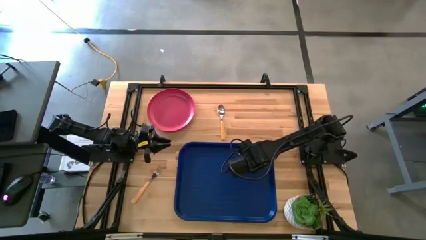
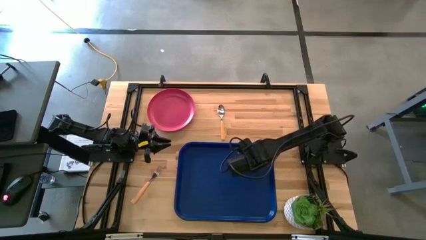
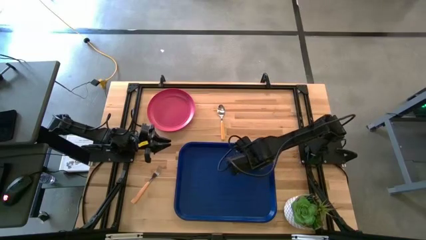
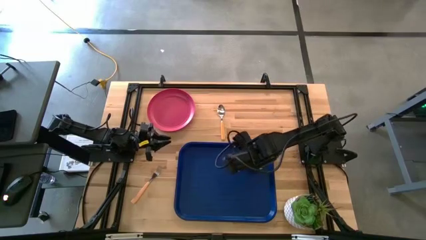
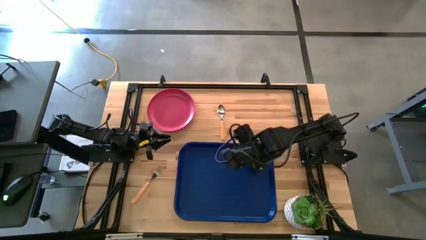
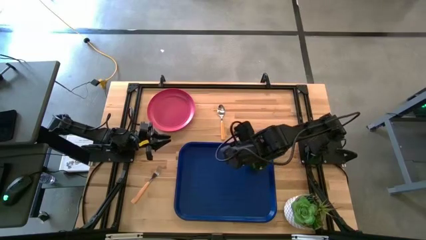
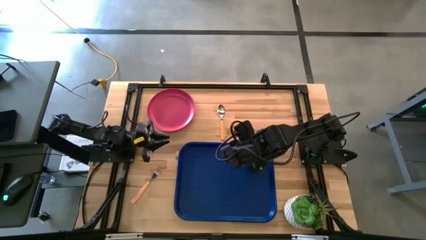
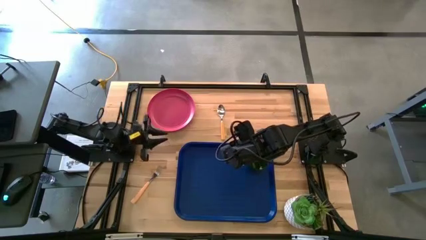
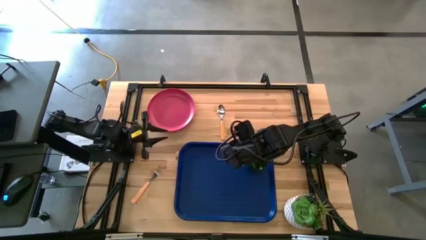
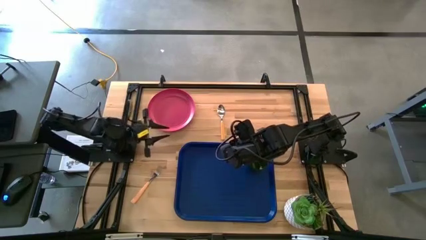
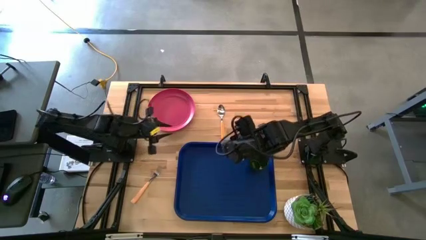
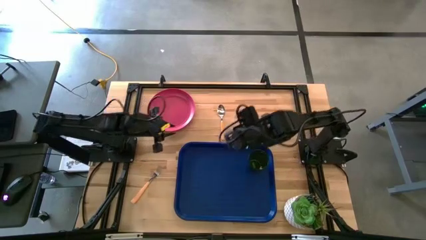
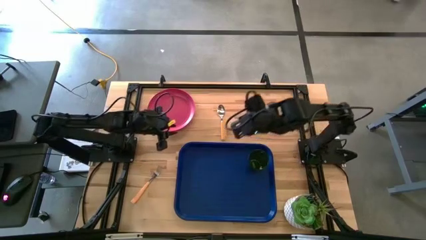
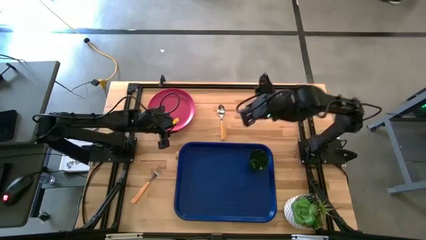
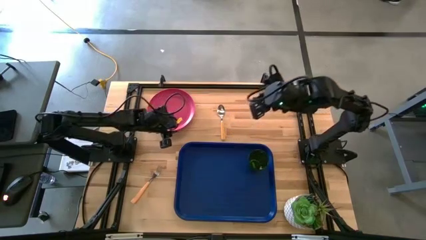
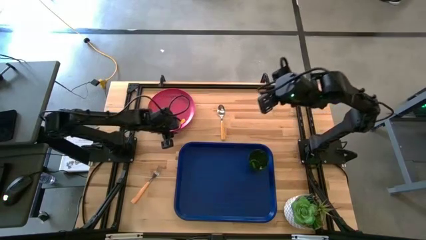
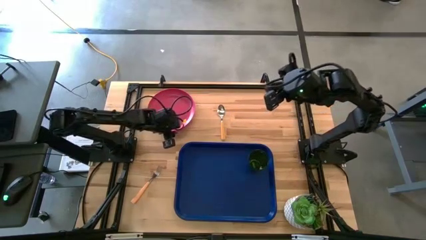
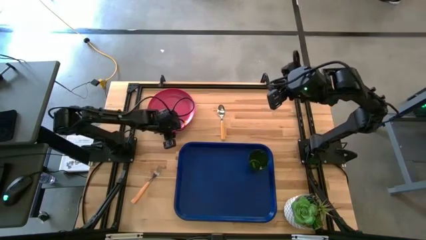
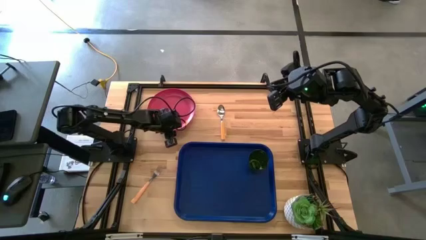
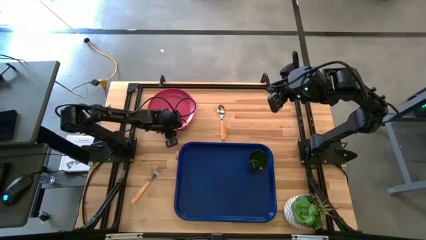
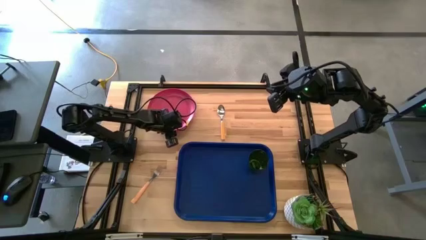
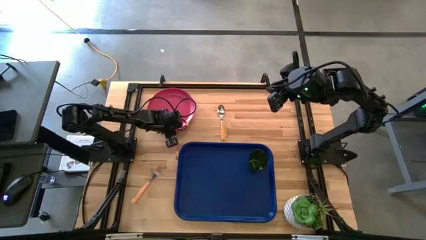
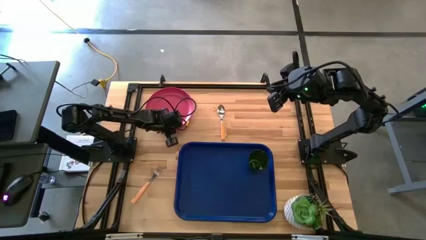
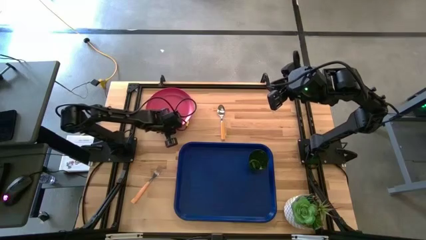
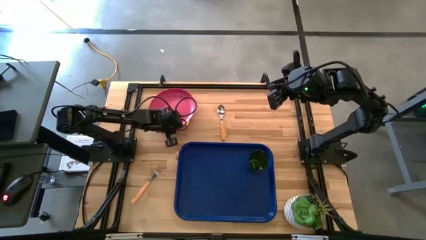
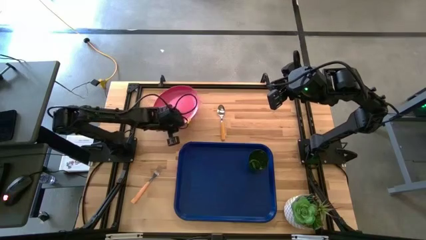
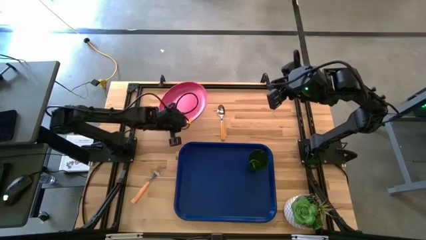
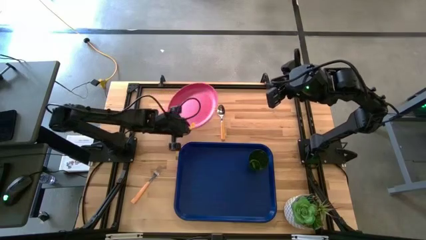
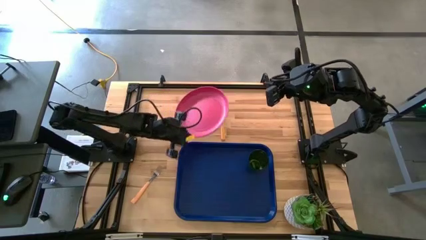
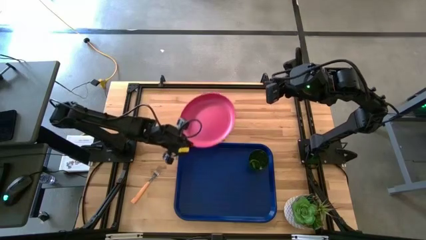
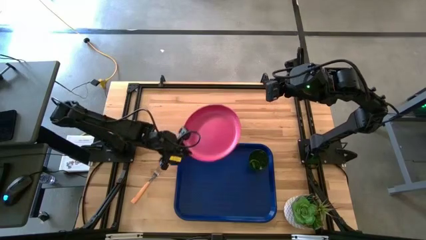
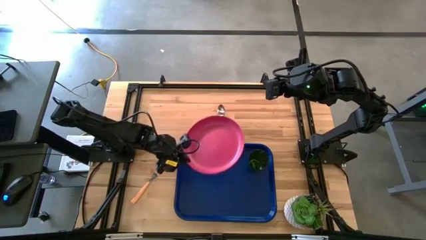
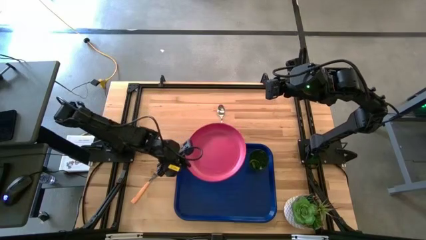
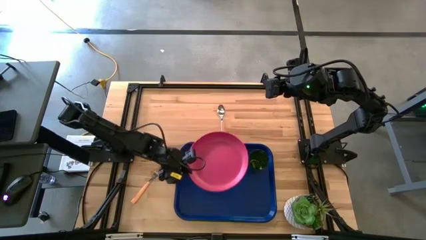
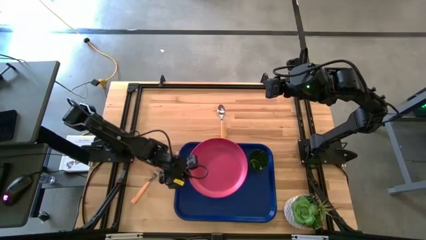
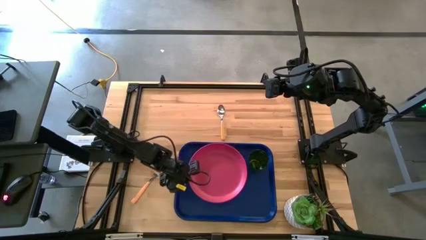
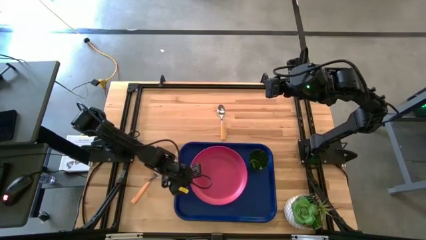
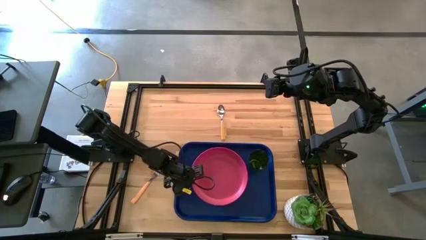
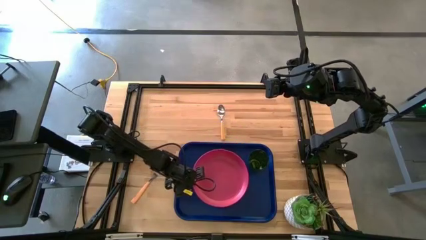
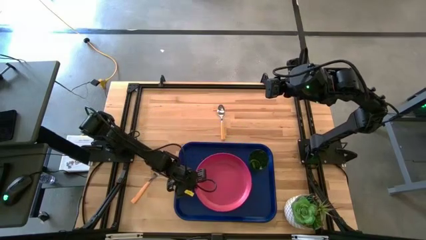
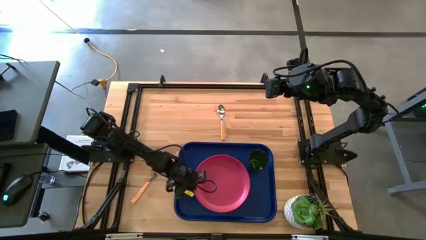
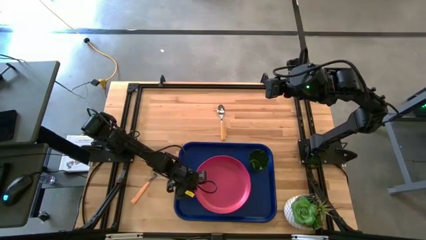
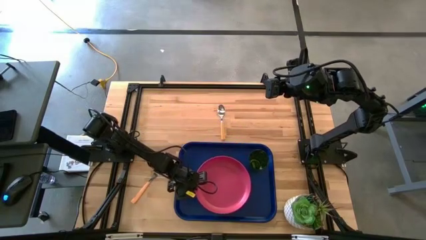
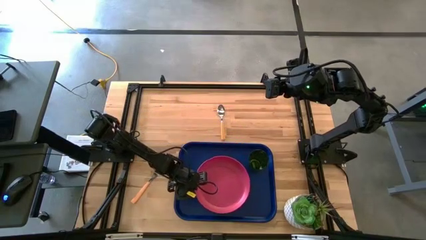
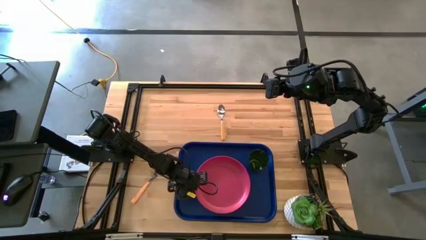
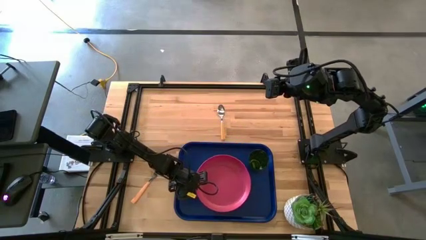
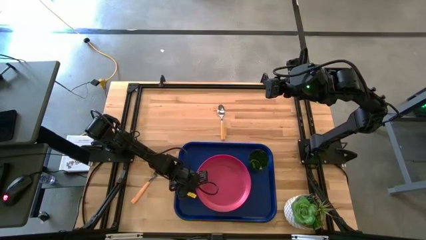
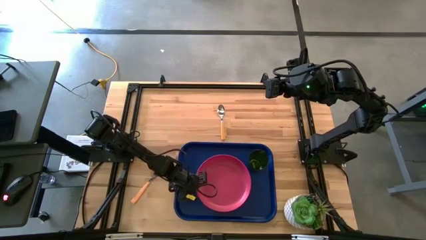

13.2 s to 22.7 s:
Task: Pick and place plate/cup/fork/spoon on tray
Put the pink plate on the blue tray

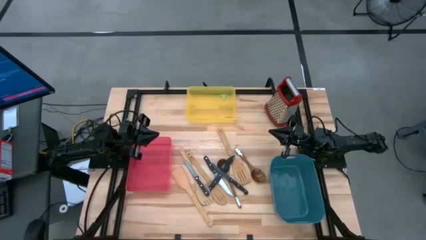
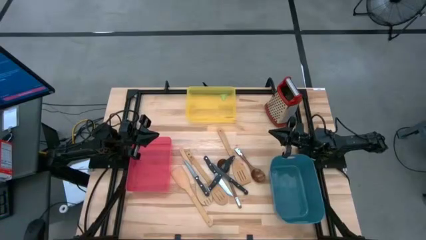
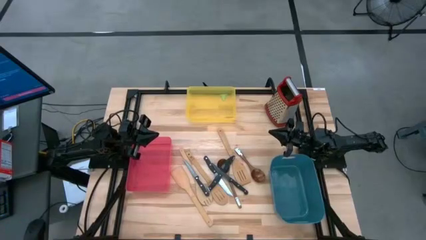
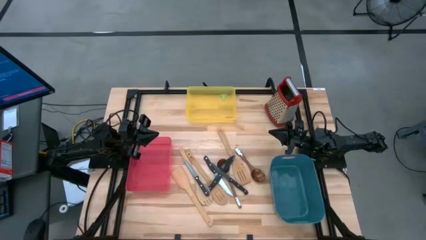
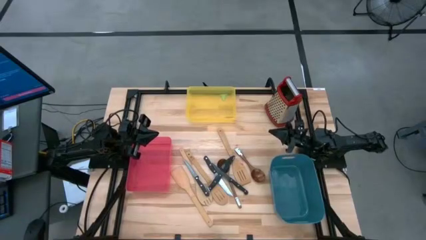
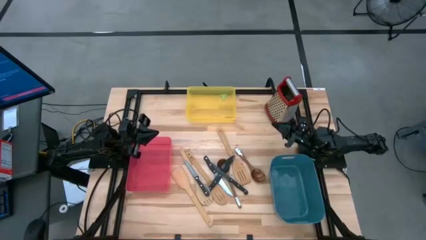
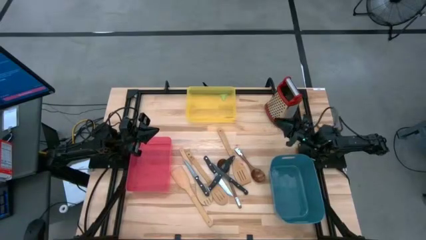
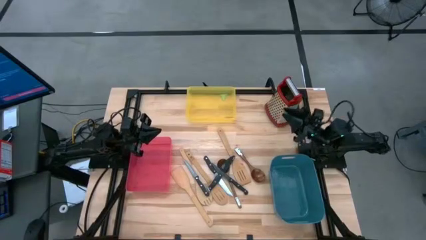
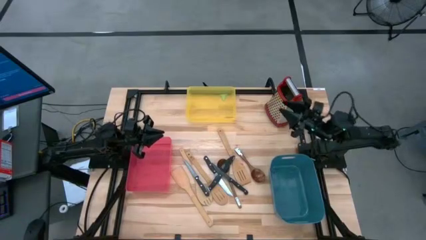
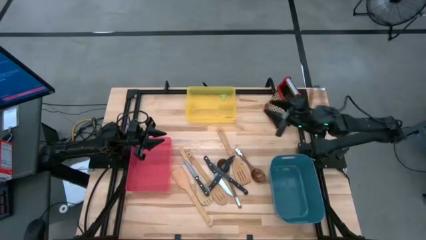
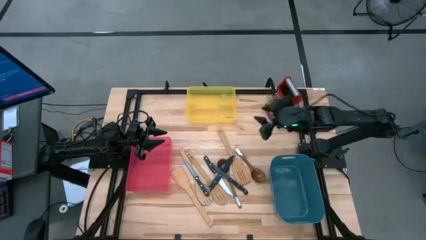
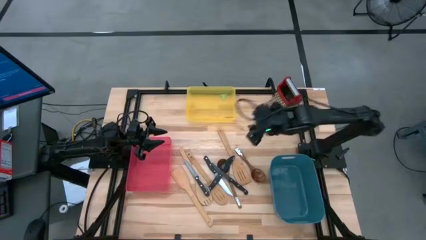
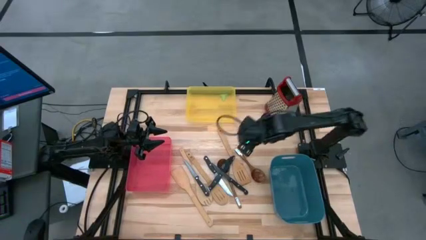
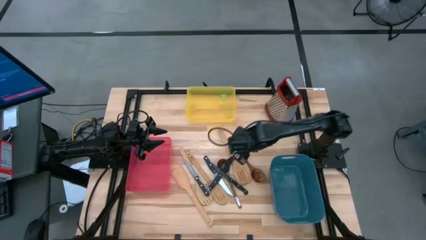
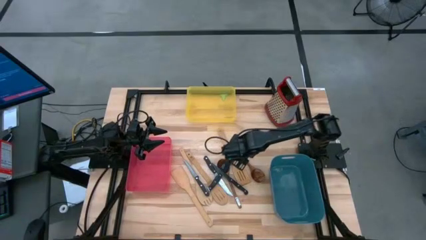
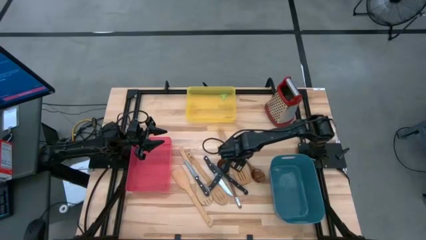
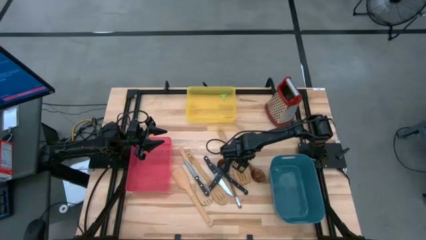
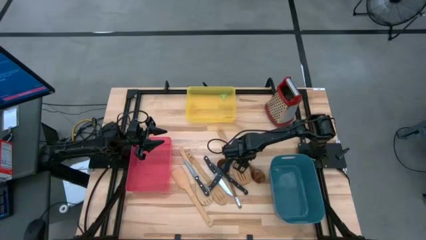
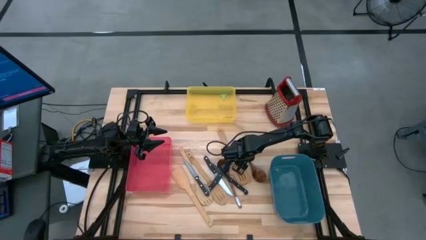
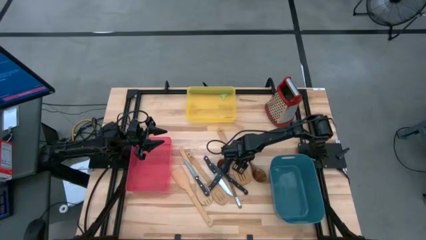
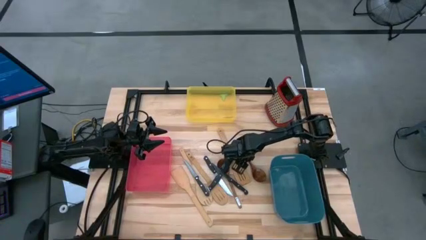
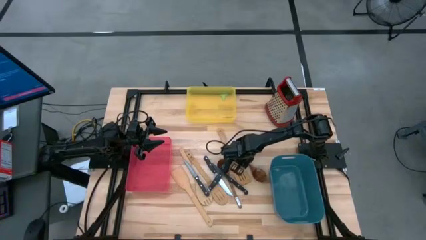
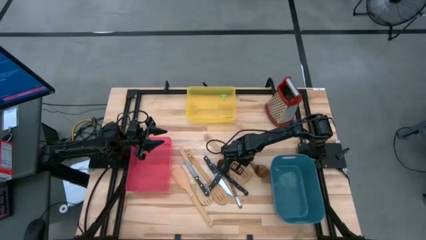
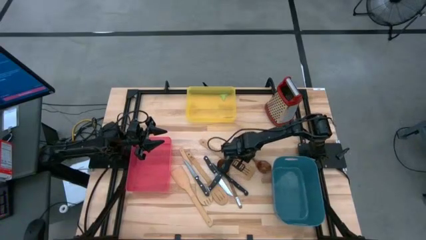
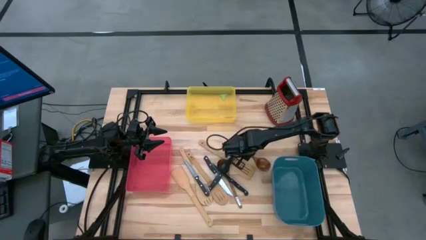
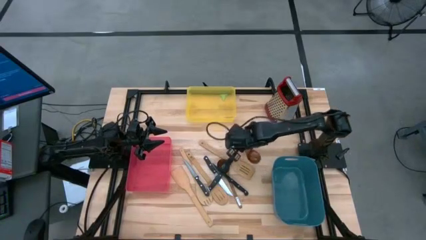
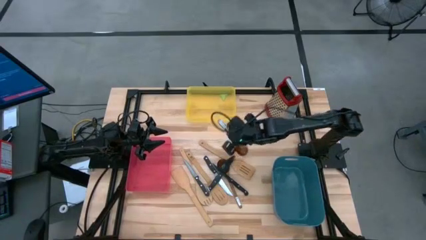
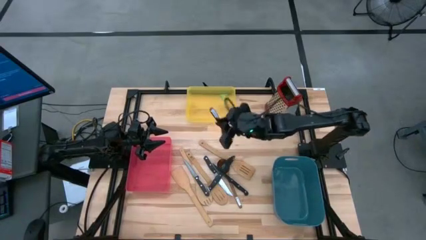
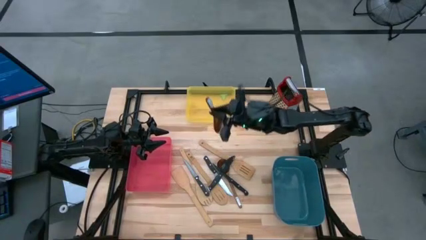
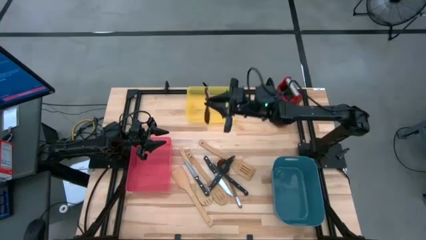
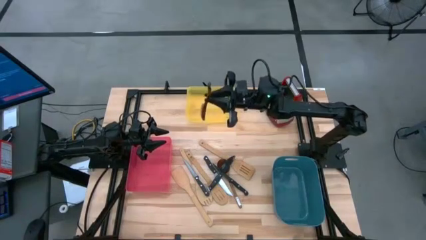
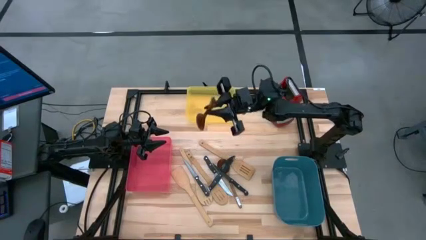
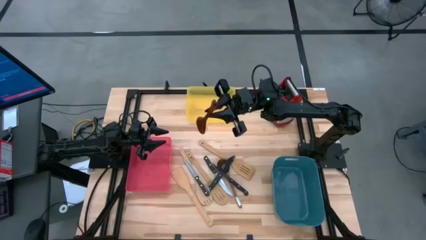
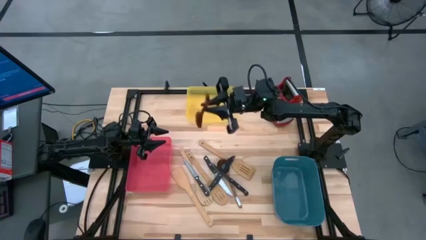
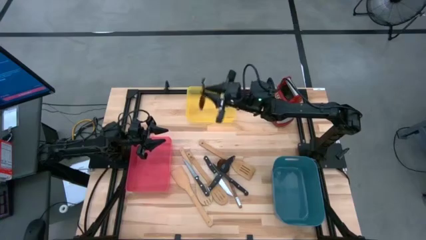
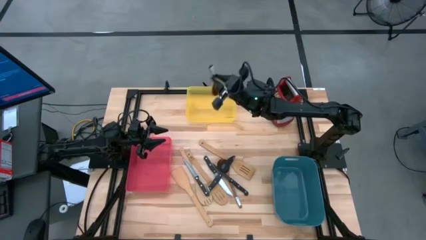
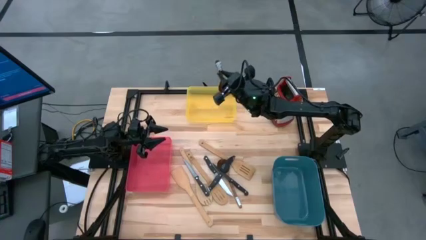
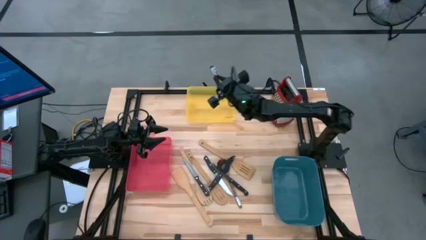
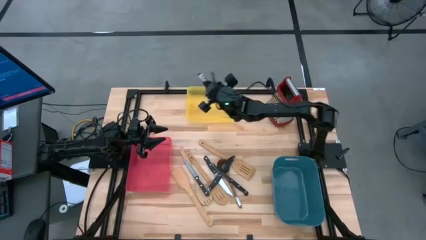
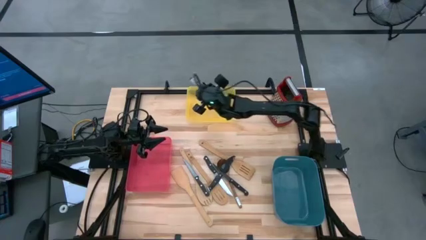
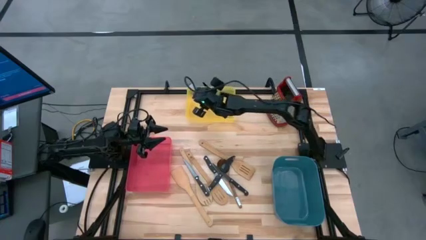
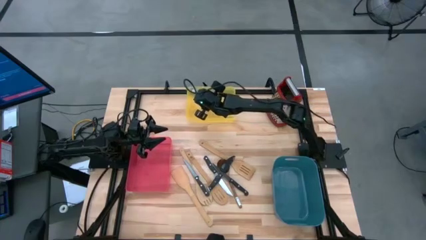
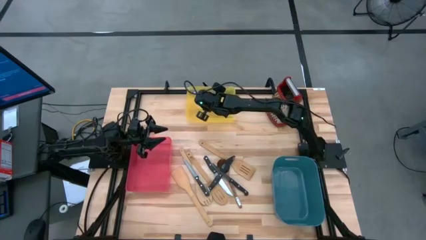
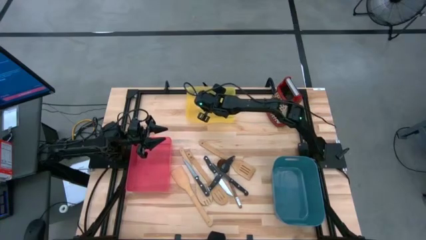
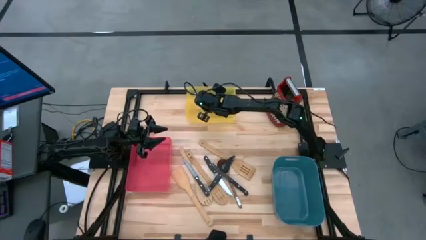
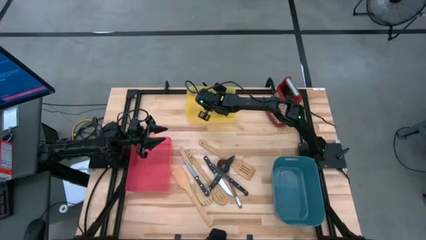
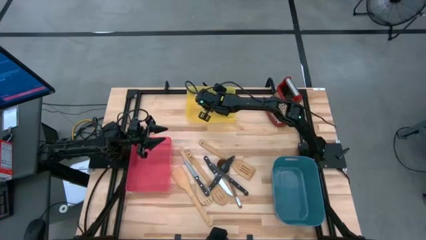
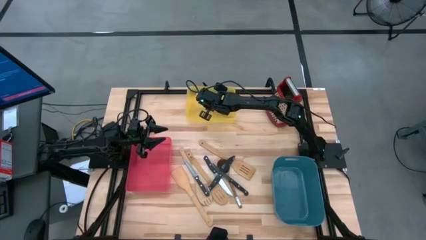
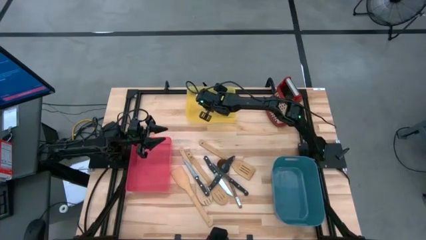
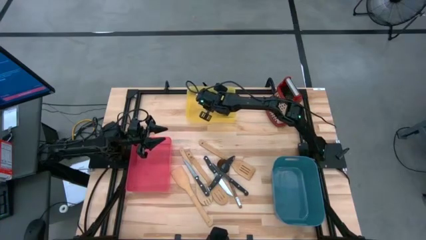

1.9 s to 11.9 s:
Task: Pick & Place Kitchen Items
Put the brown serving spoon into the yellow bin
